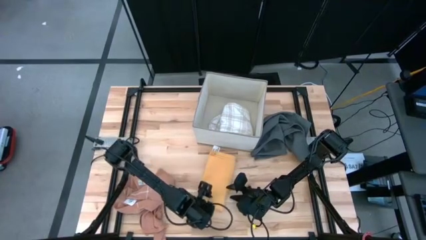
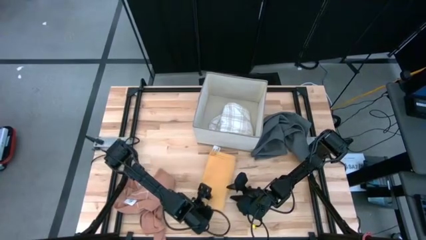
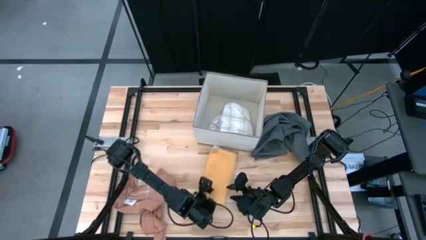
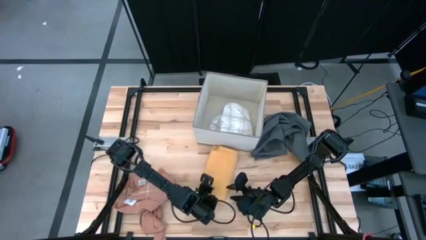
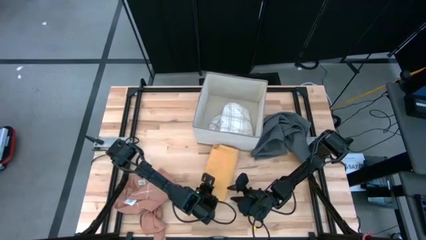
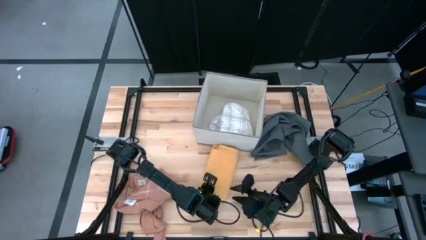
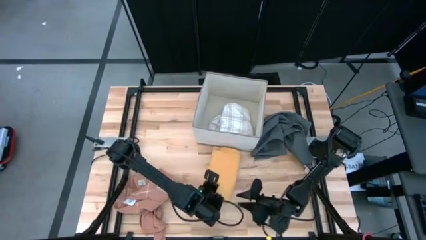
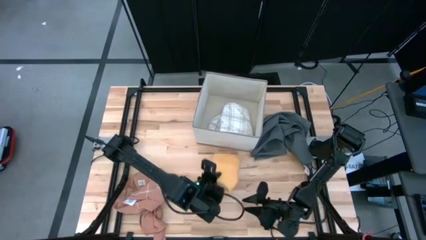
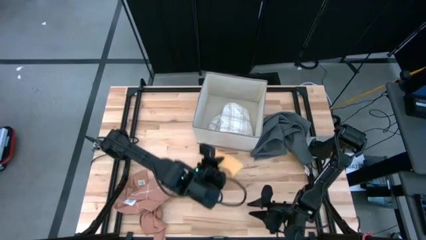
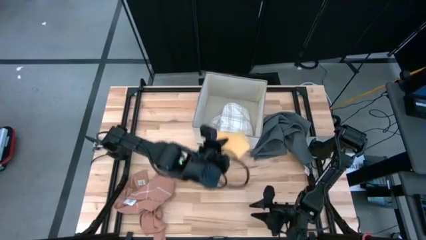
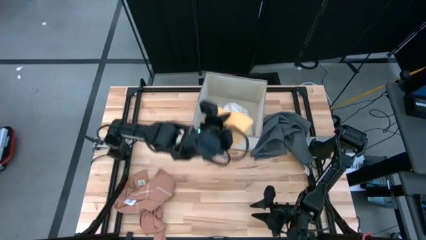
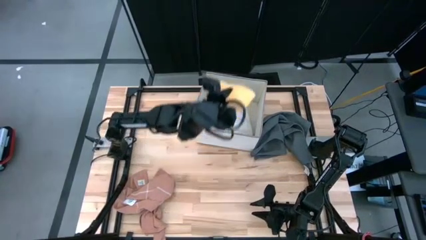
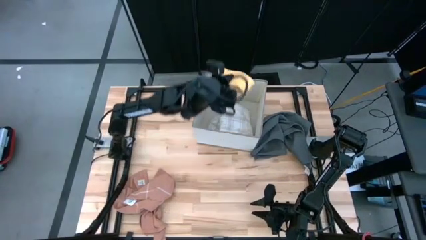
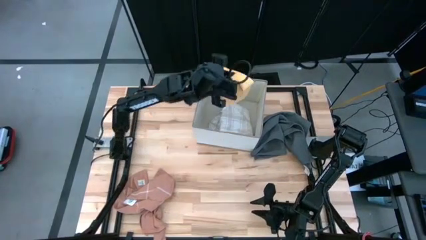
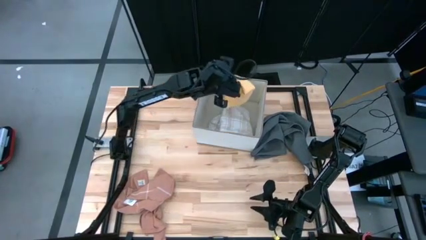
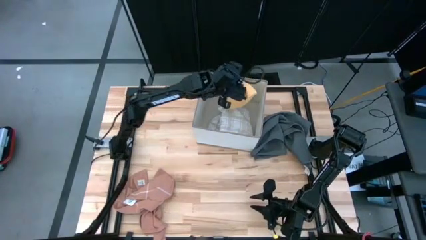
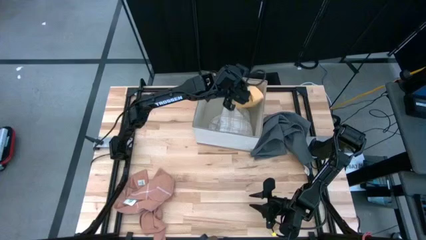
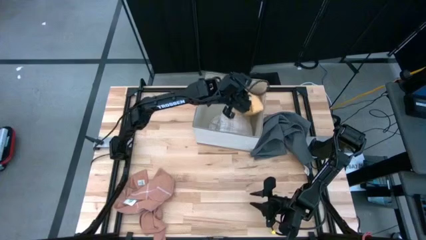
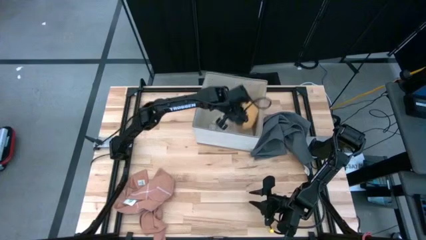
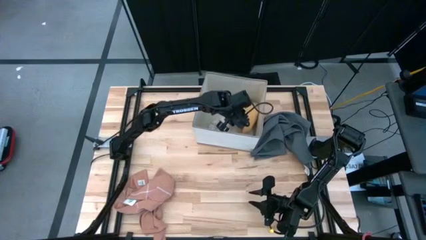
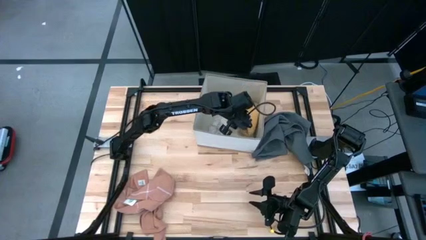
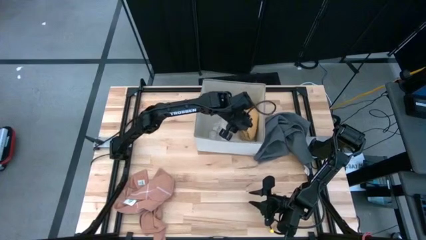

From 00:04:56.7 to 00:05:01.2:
Task: Fold towel
Put the yellow towel into the laundry organizer

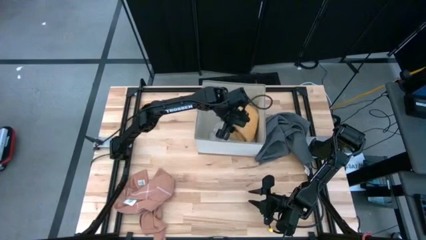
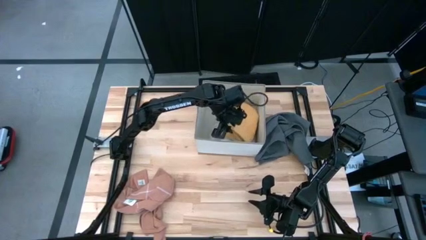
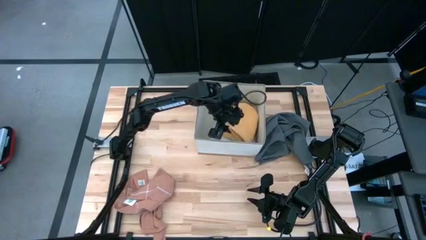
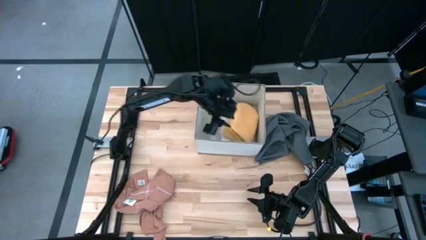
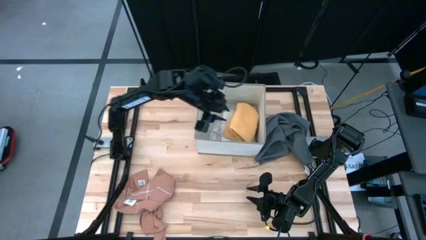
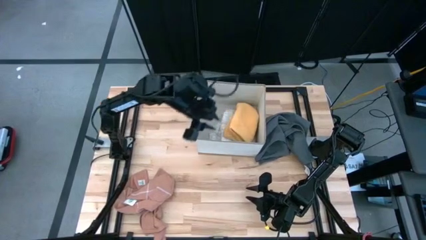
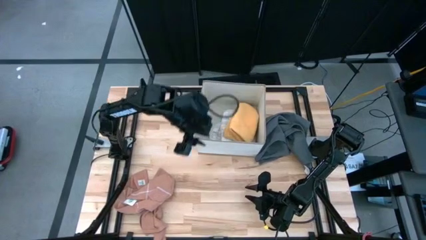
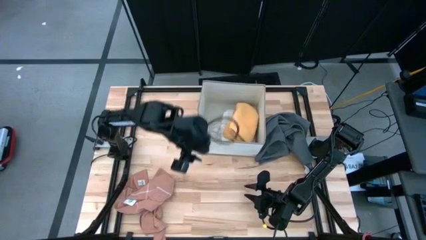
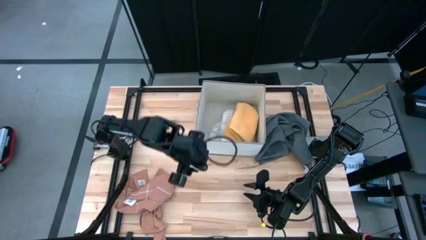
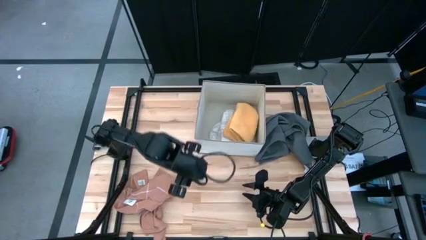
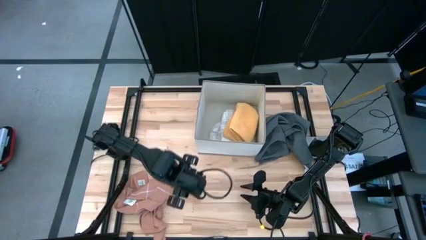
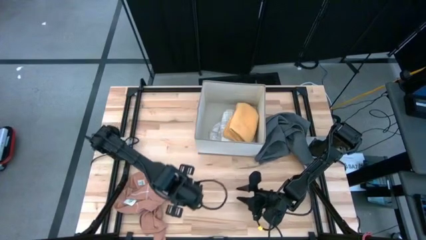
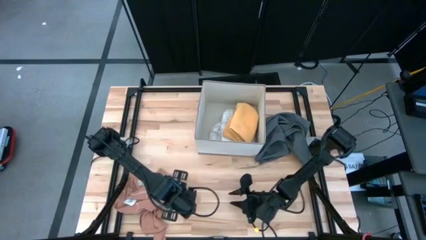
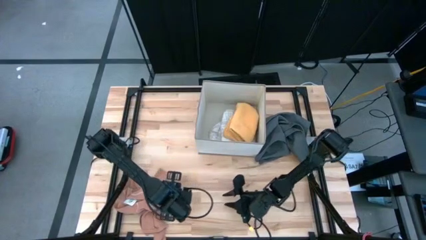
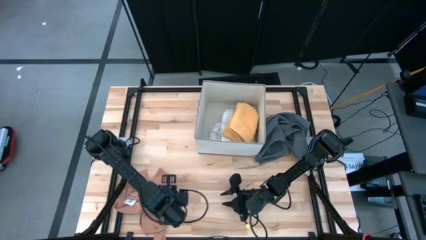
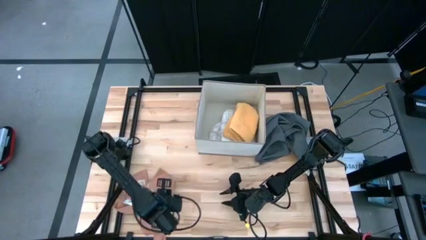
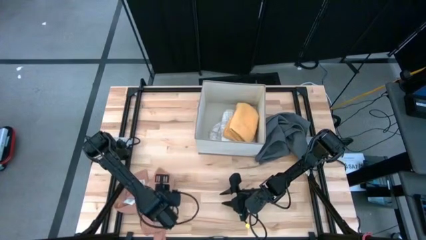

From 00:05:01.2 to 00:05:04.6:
Fold the light orange towel

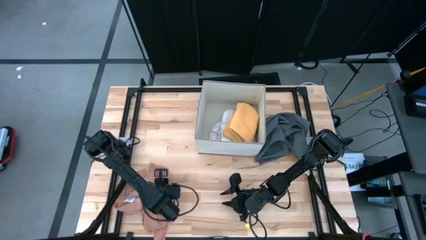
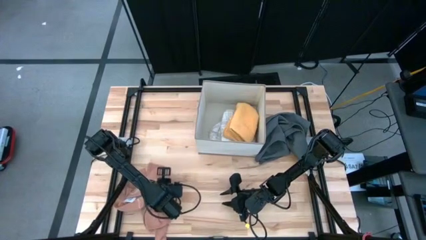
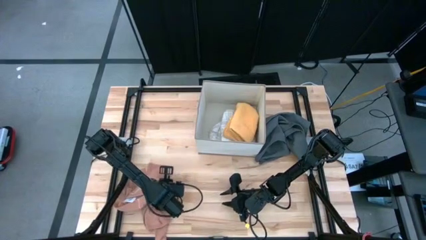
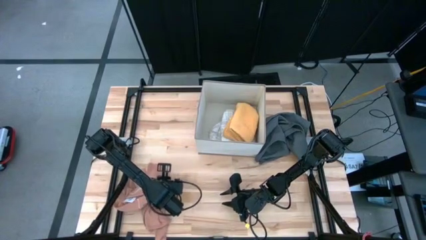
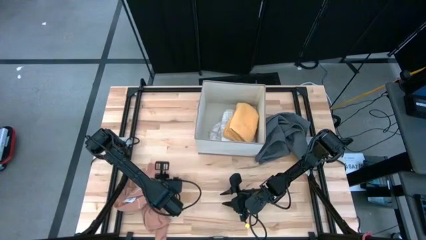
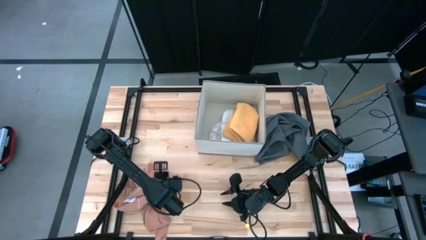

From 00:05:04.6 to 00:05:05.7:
Fold the light orange towel

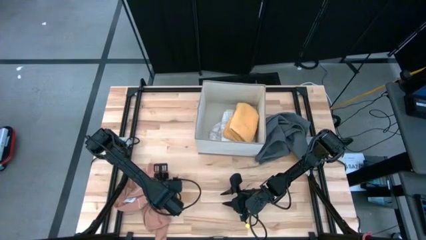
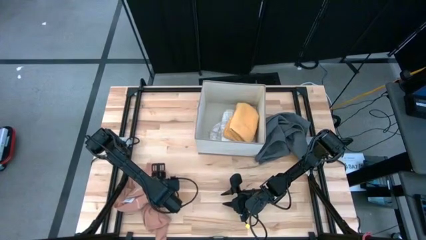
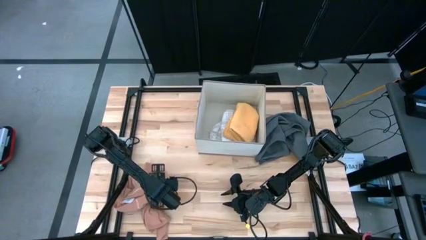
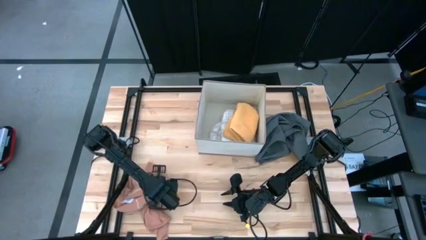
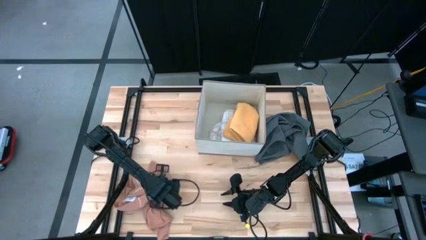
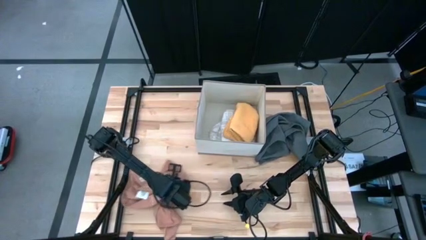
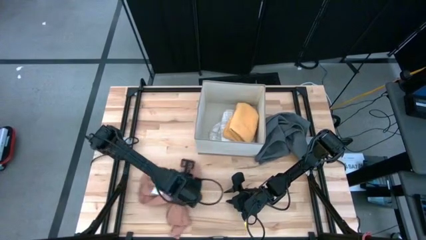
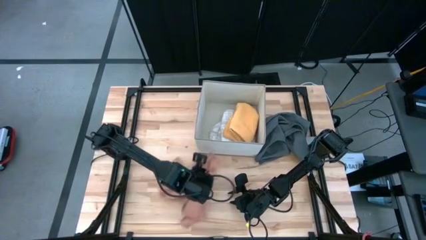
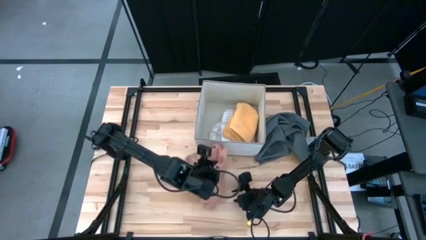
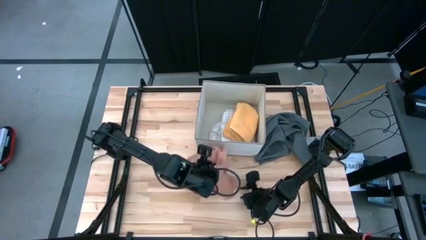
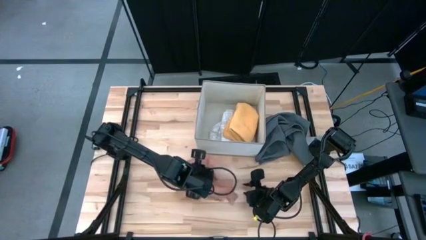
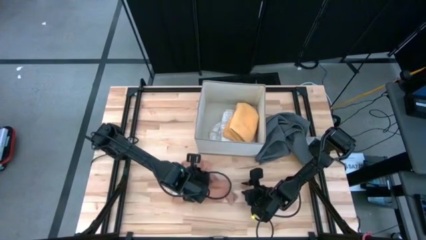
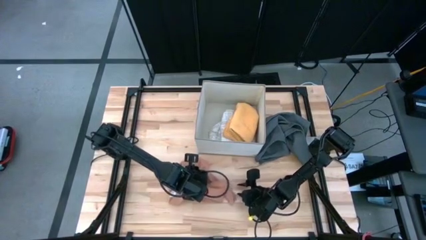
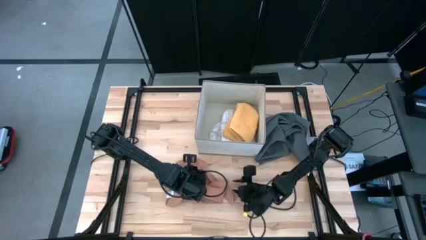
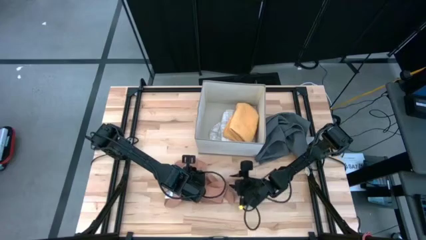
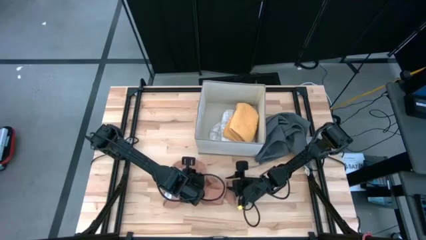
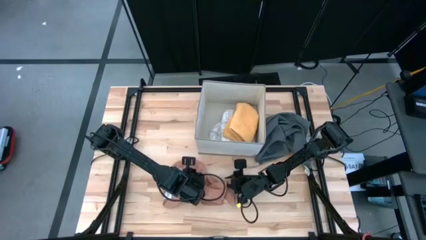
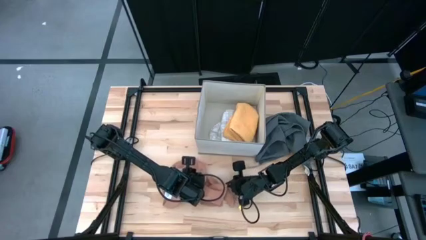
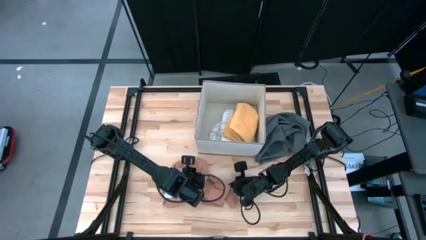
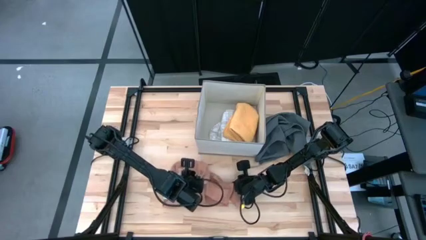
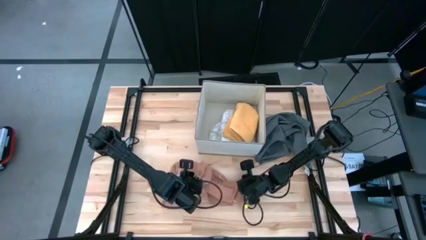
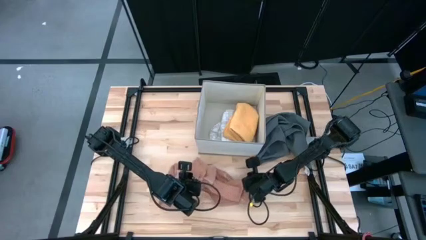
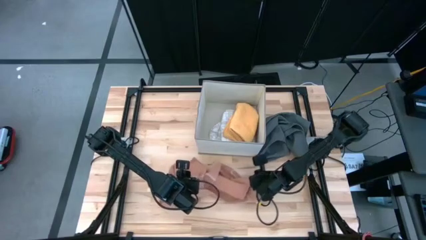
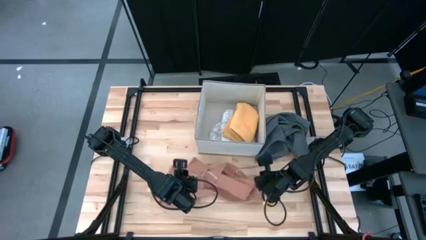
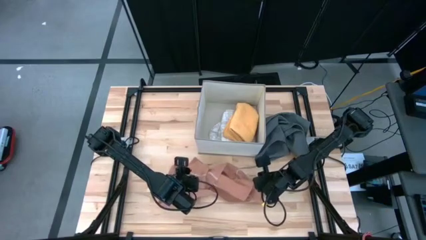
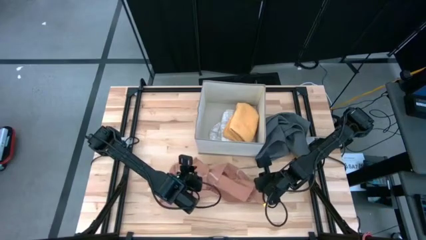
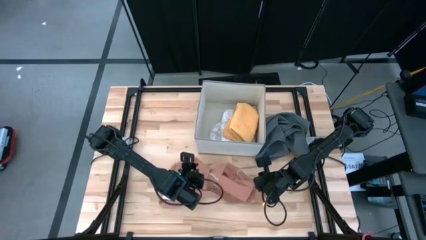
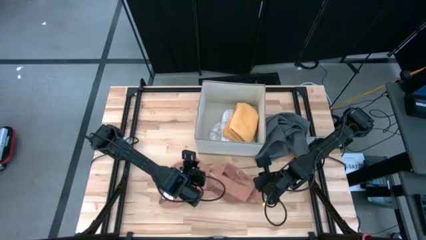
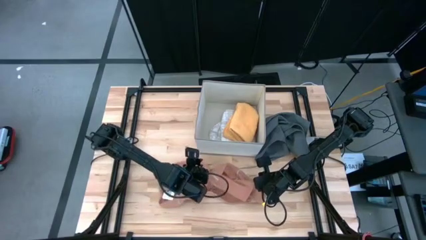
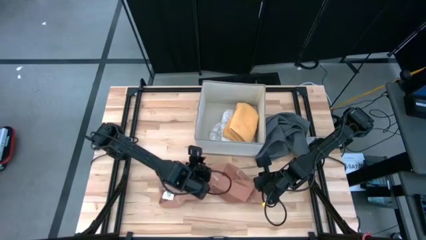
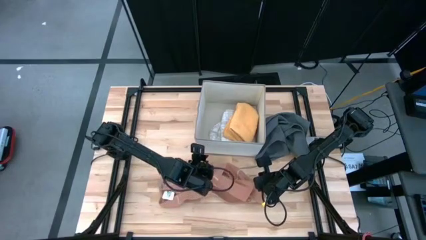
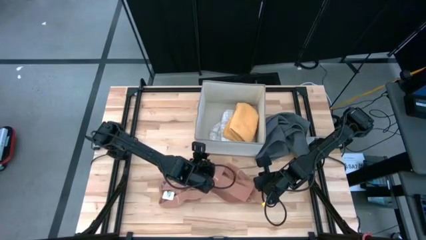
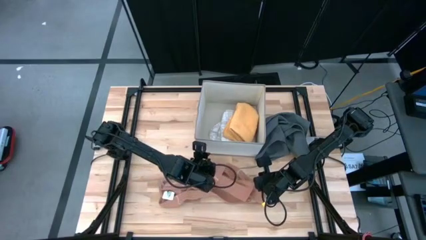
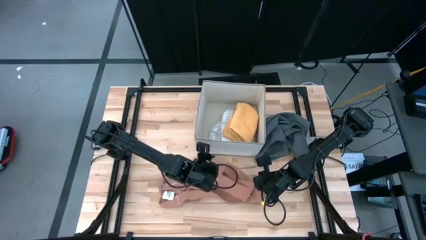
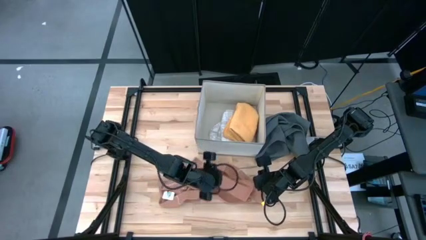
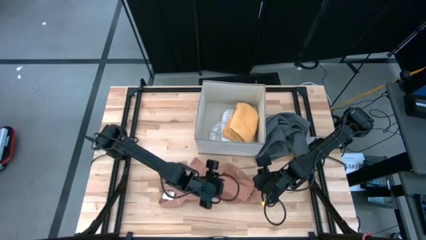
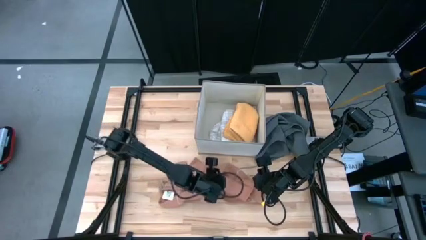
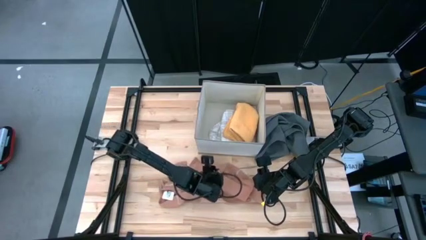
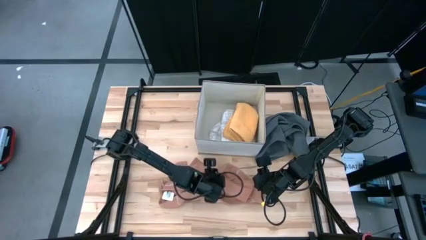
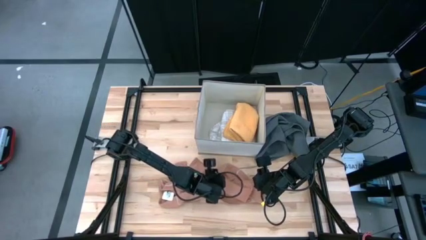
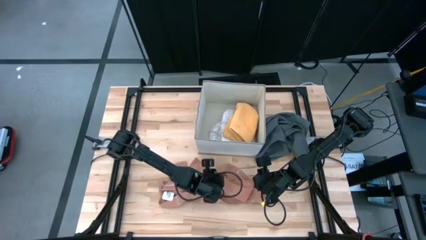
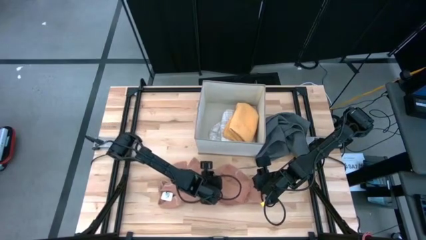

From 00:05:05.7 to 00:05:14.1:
Fold the light orange towel

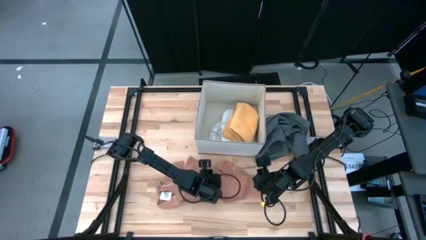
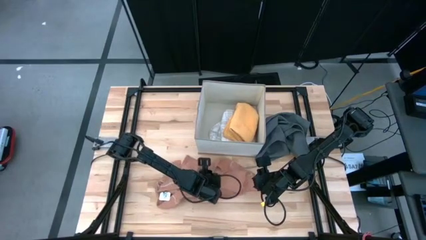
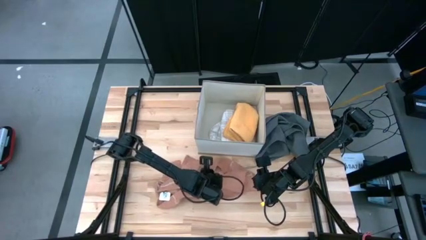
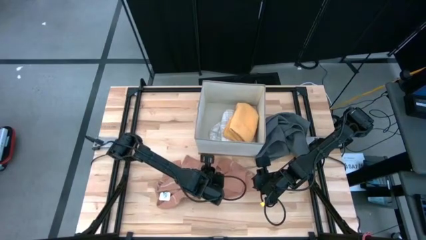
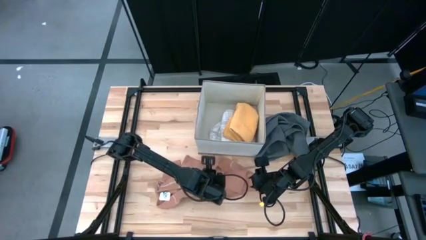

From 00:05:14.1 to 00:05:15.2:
Fold the light orange towel
